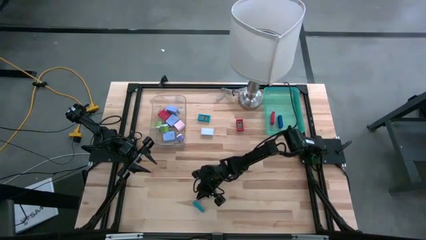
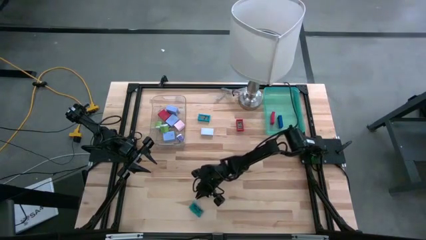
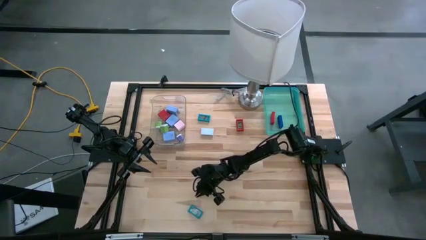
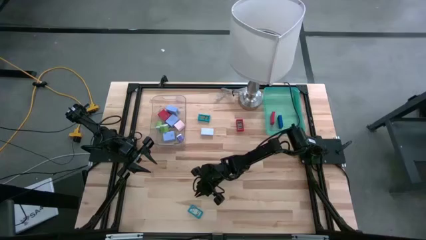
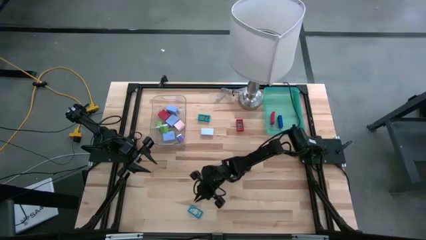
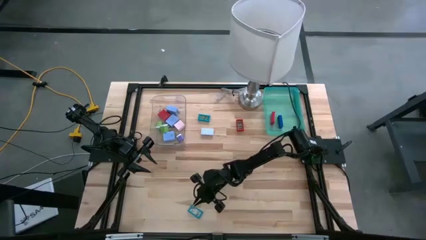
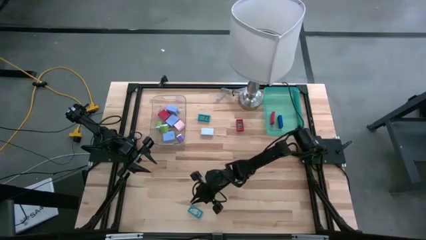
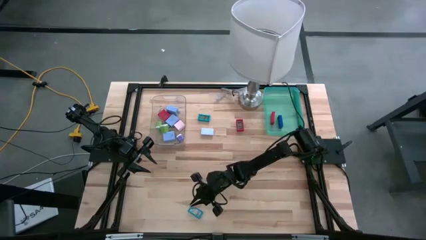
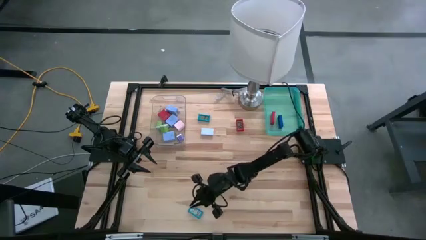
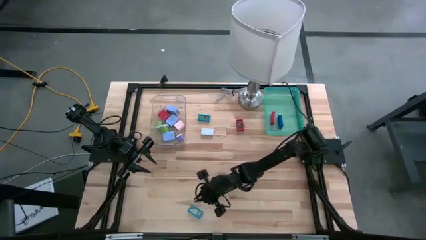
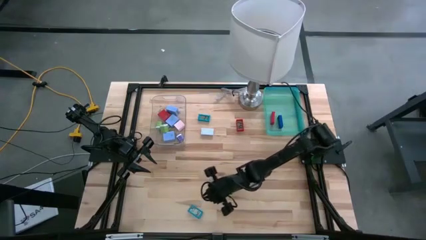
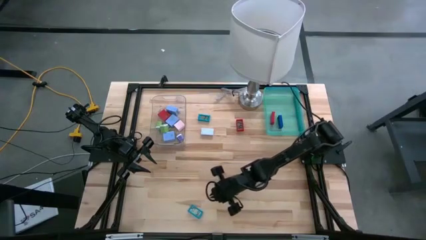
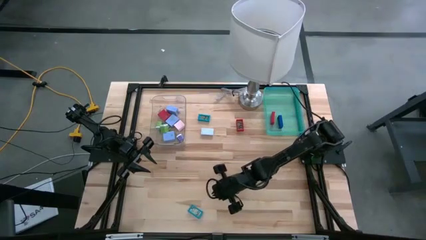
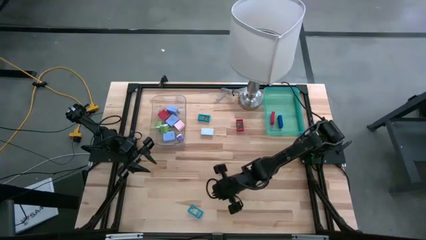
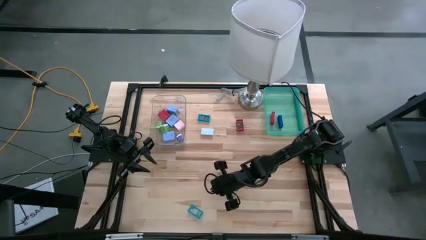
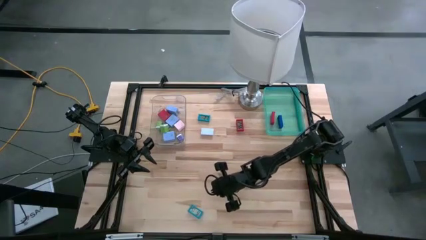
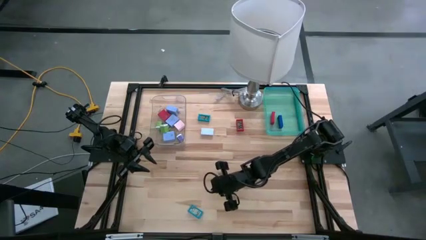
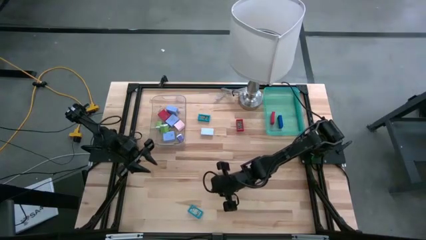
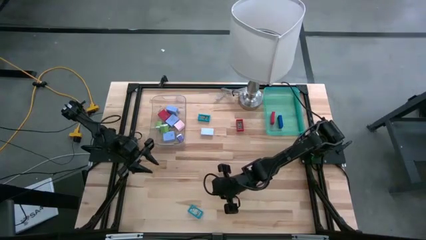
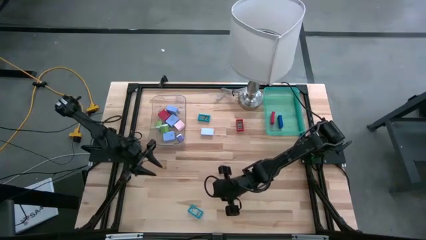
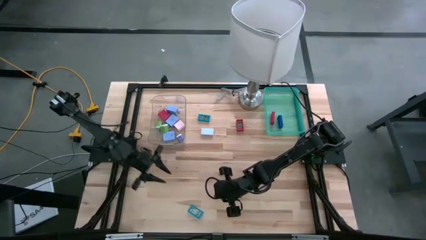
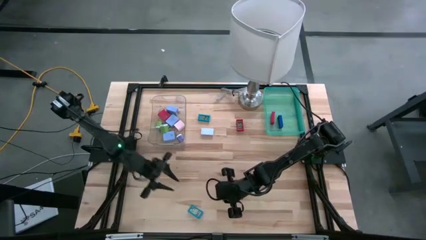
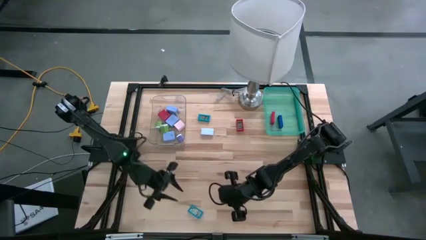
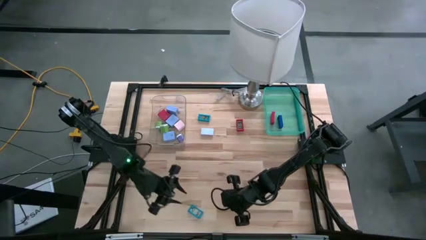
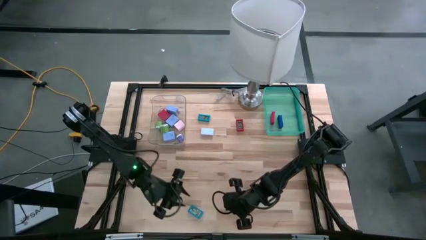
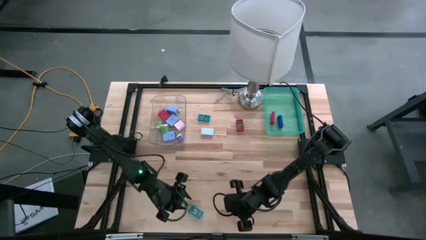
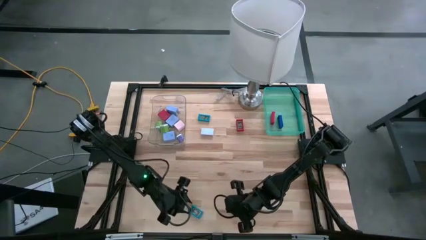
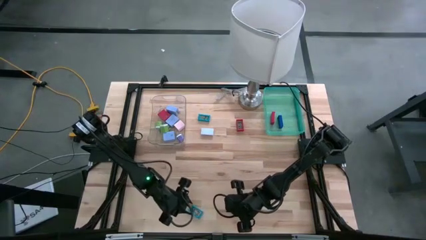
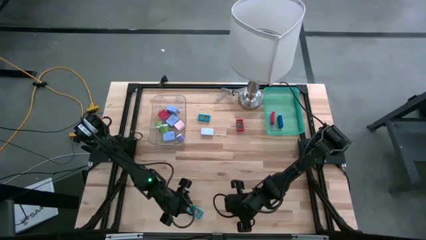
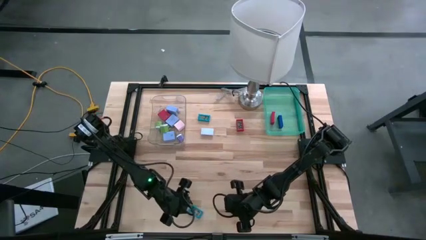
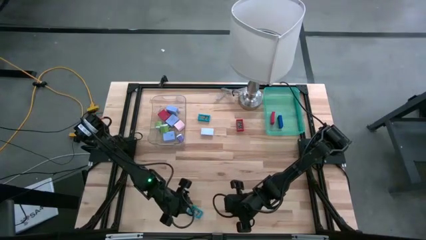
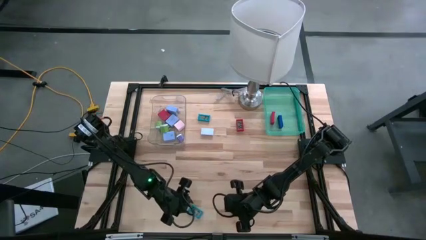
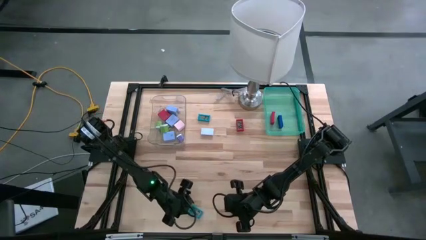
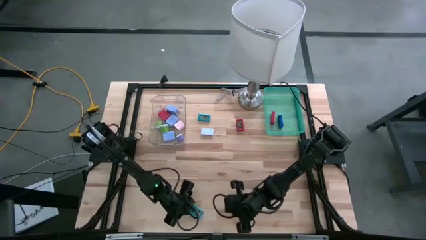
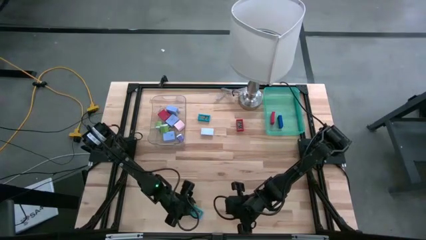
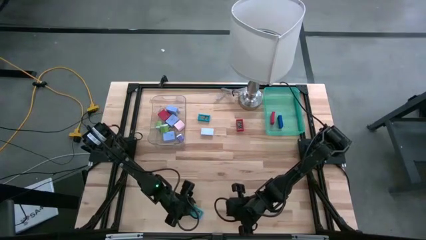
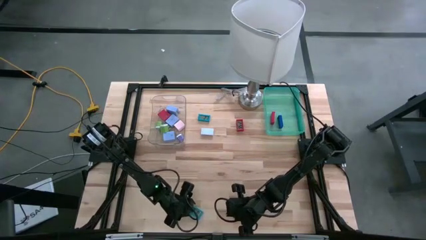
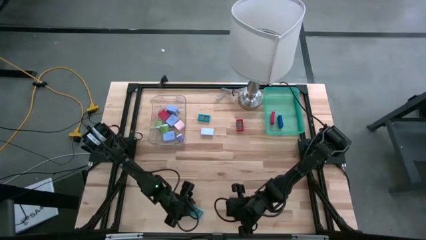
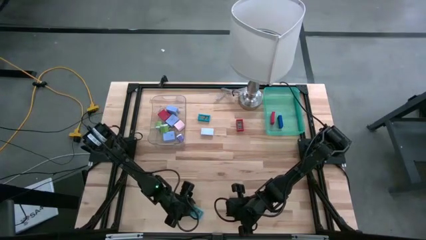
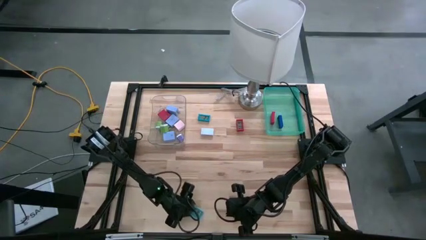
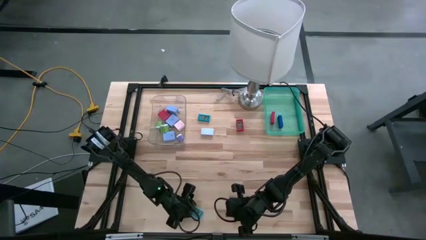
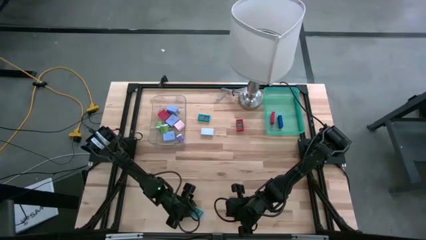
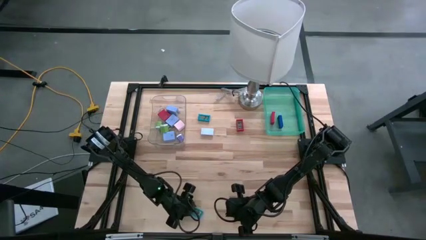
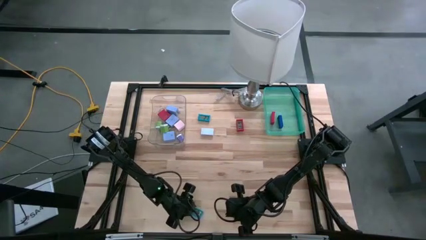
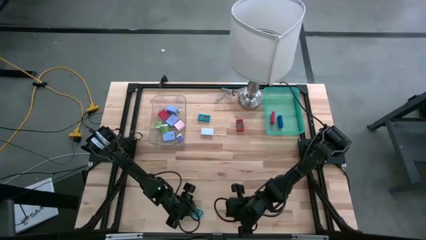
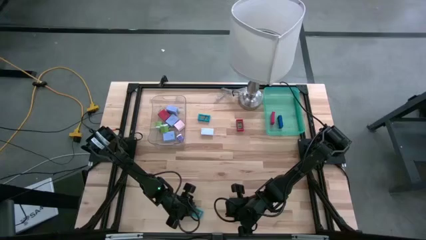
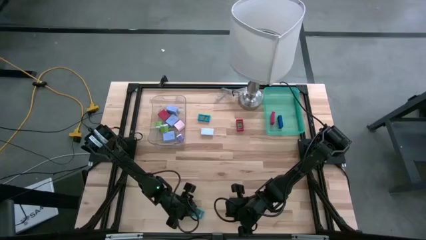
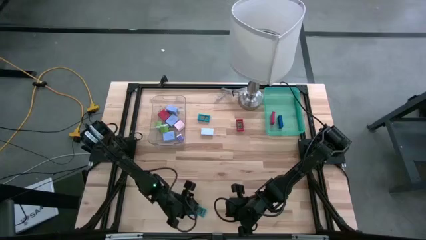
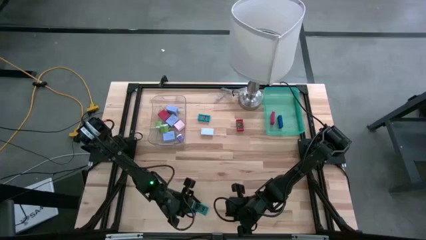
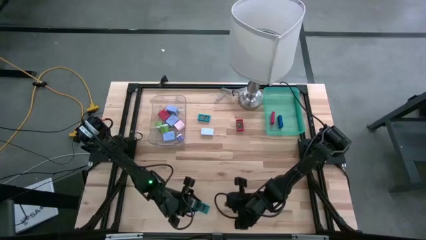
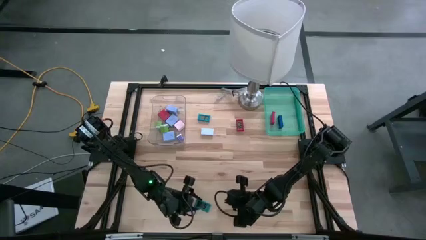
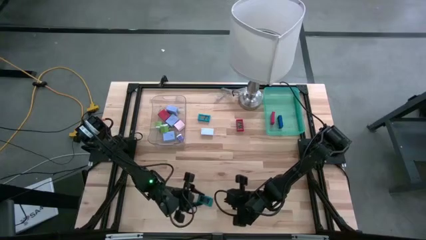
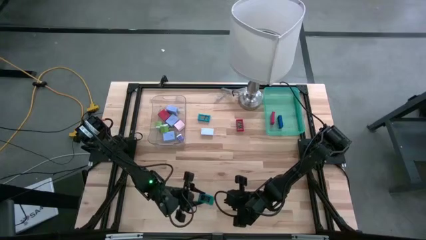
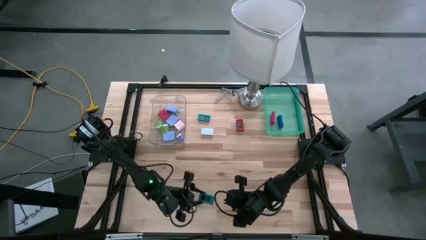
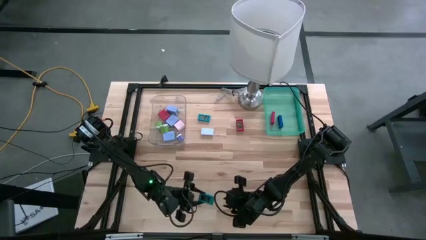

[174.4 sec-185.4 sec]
Task: Pick & Place Office items
Put the bottom light blue mini digital clock into the light blue bin

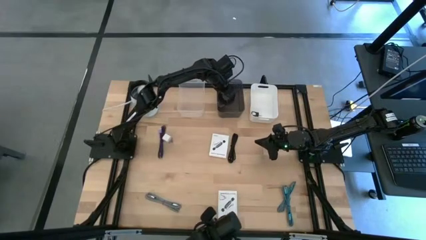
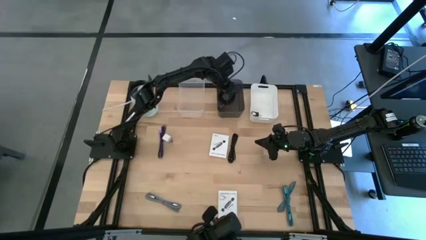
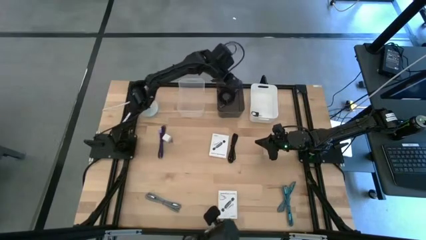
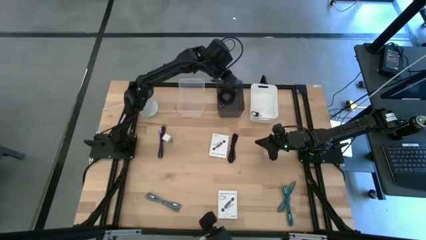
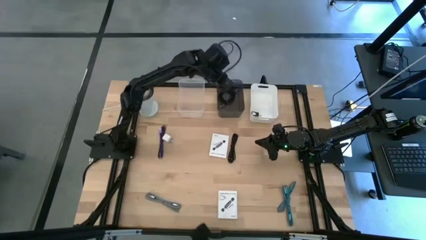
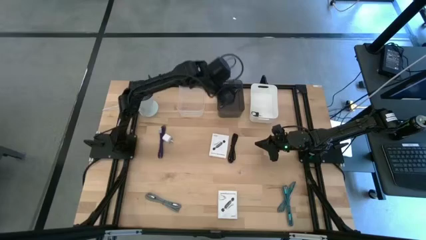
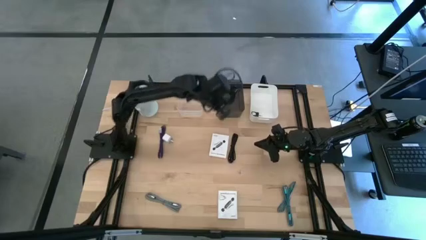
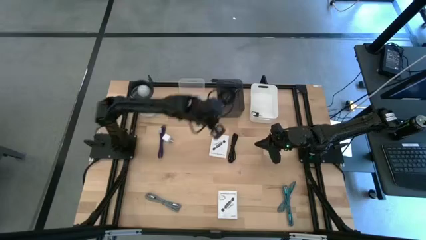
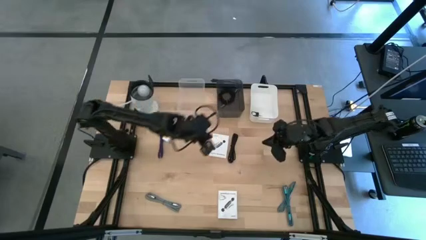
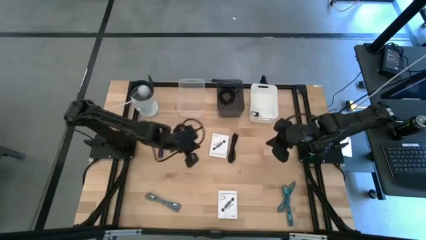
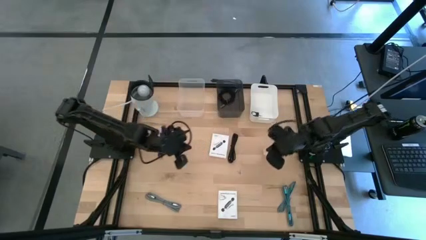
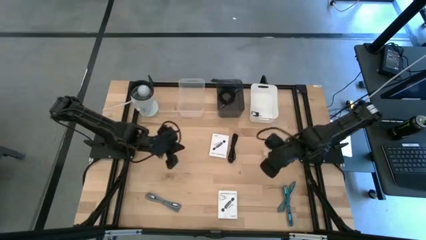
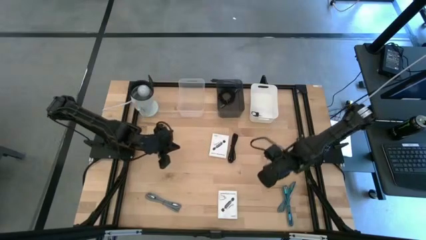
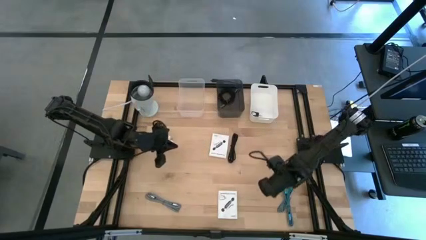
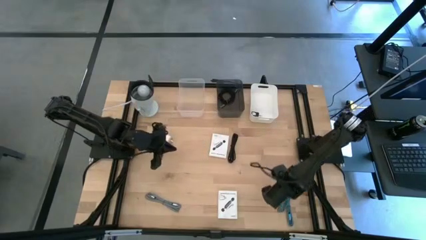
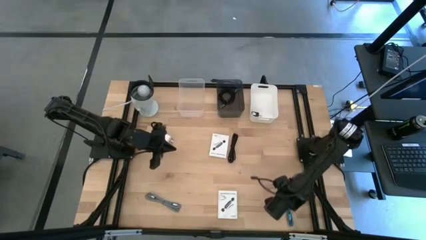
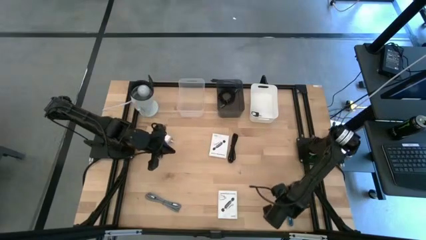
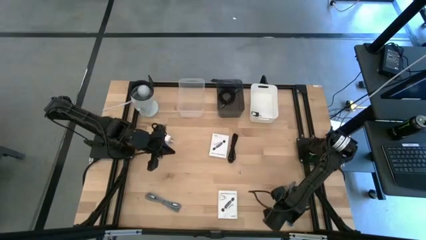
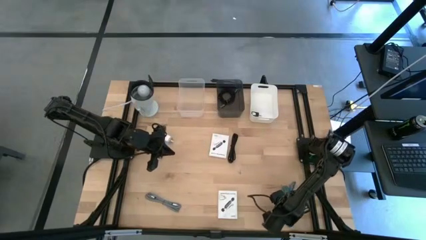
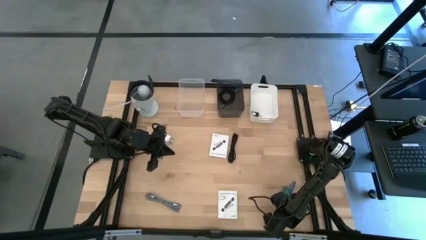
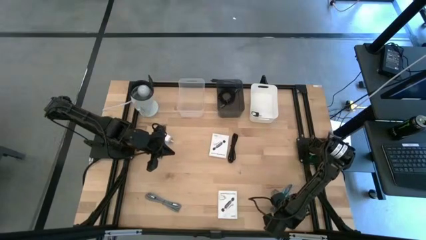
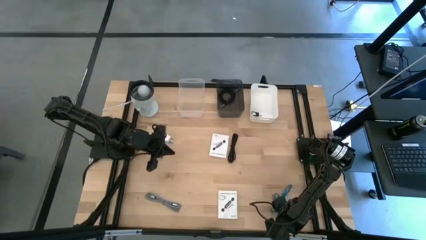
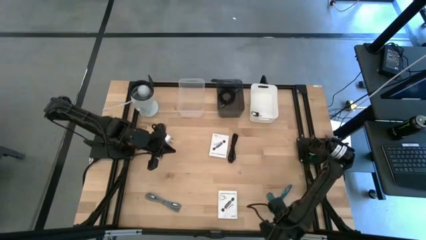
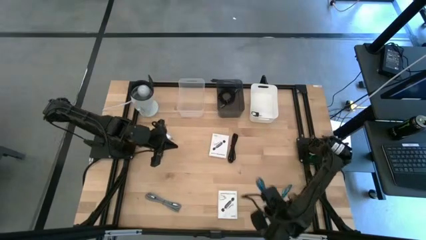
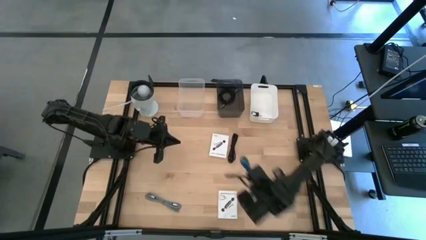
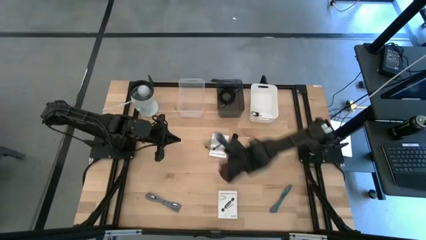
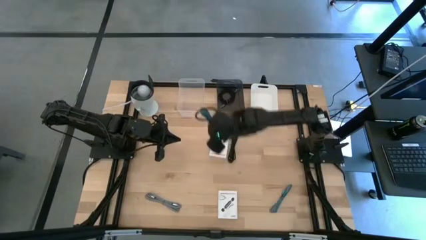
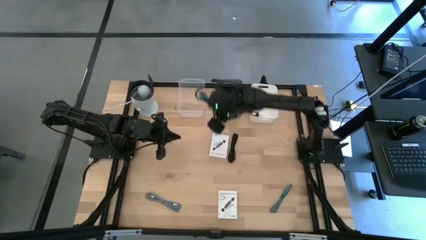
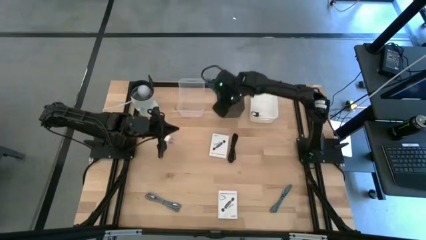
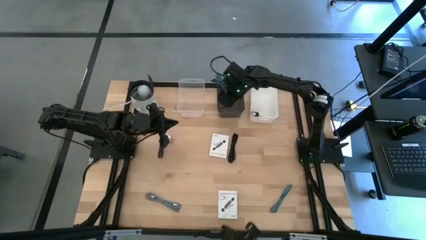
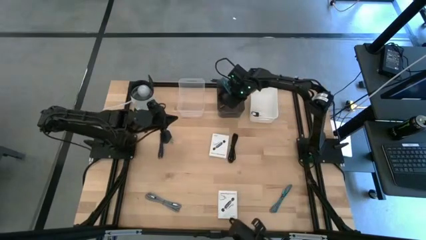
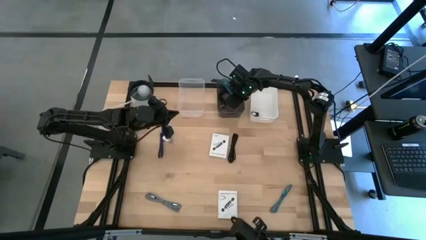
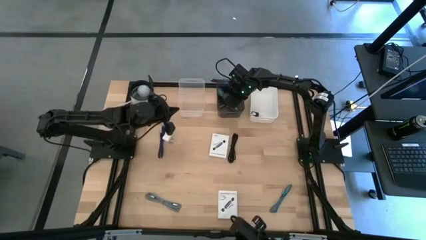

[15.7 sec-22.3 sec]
Task: Pick and place items into bin
Put the right blue charger cable into the black bin
